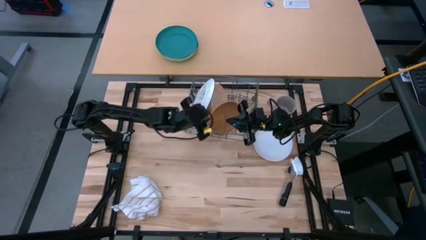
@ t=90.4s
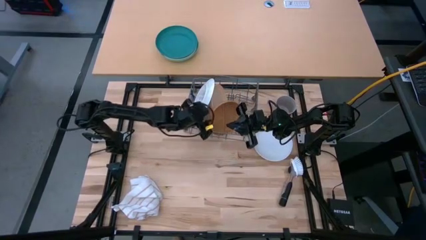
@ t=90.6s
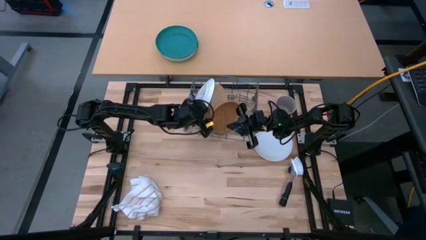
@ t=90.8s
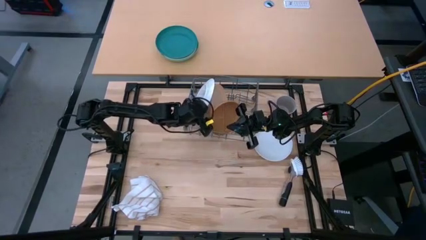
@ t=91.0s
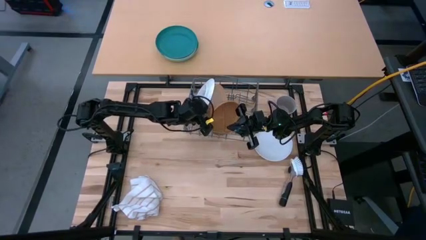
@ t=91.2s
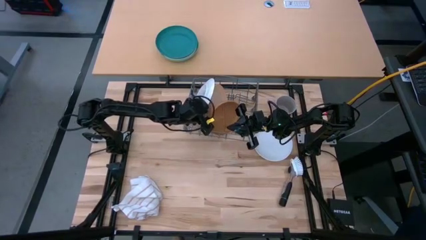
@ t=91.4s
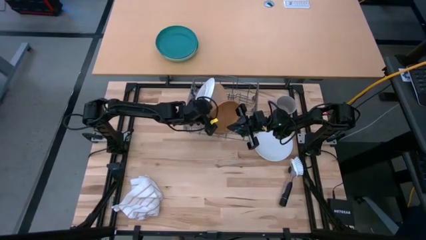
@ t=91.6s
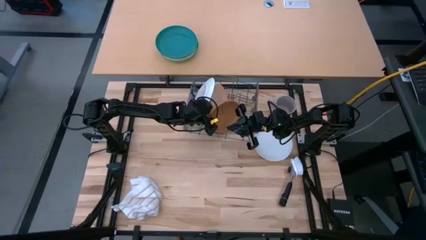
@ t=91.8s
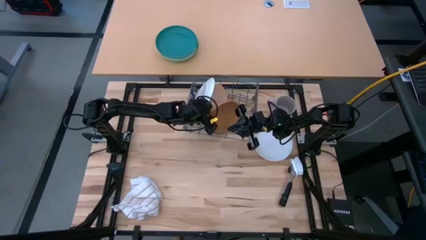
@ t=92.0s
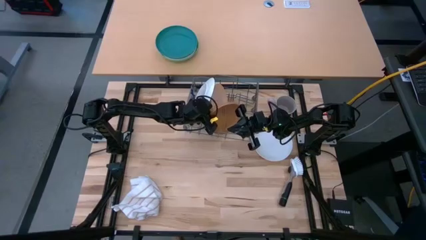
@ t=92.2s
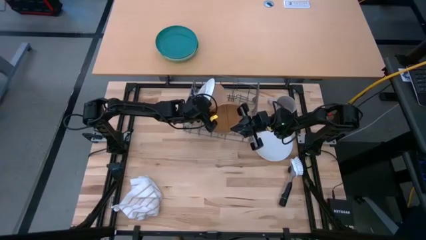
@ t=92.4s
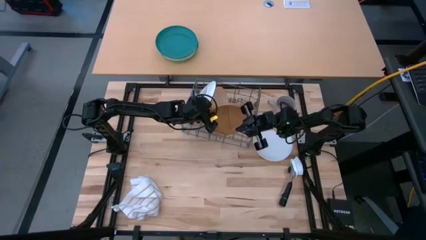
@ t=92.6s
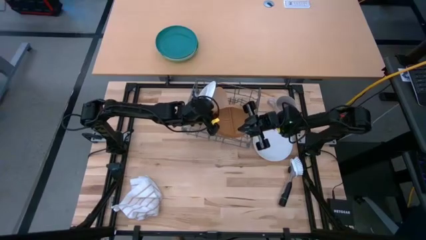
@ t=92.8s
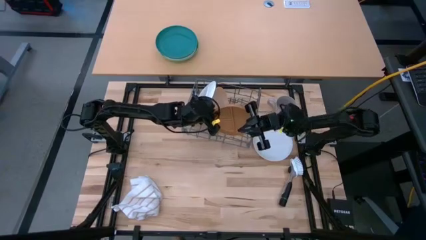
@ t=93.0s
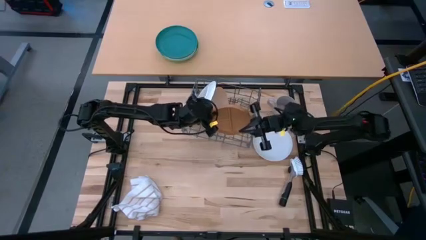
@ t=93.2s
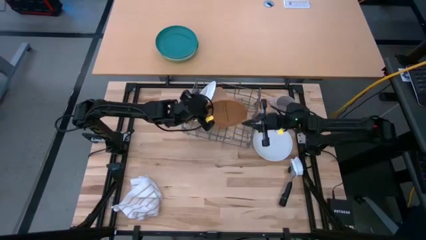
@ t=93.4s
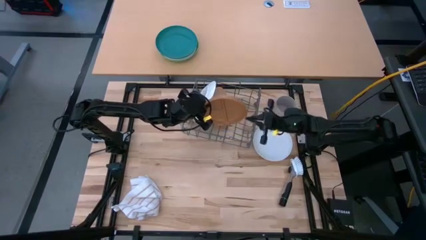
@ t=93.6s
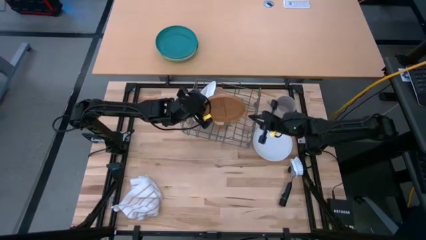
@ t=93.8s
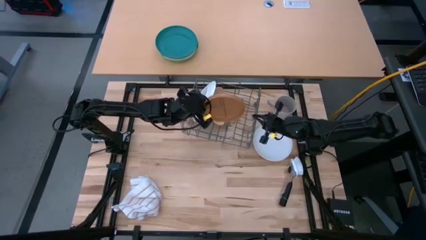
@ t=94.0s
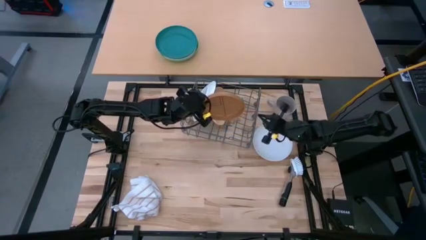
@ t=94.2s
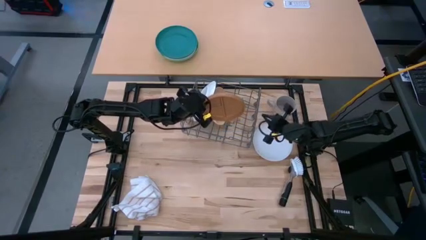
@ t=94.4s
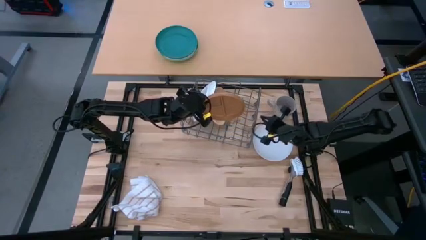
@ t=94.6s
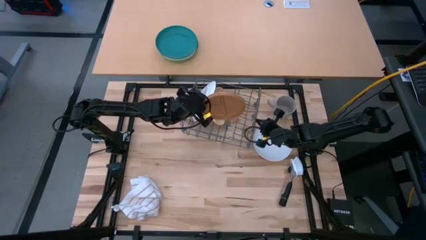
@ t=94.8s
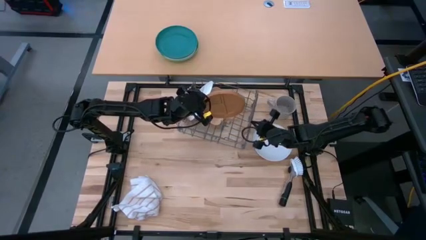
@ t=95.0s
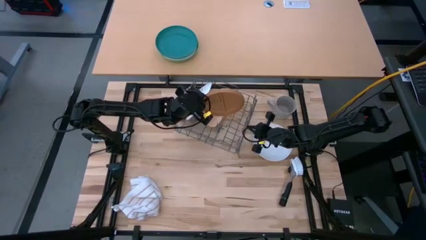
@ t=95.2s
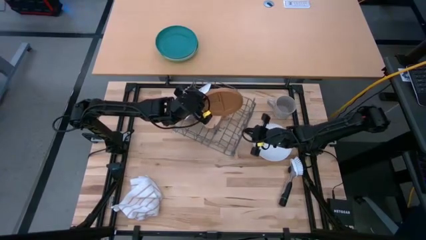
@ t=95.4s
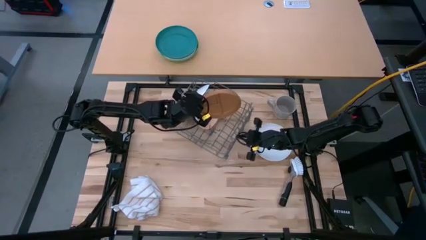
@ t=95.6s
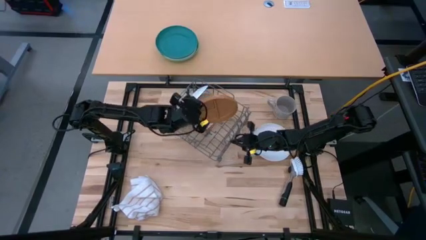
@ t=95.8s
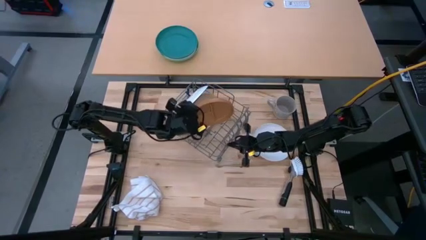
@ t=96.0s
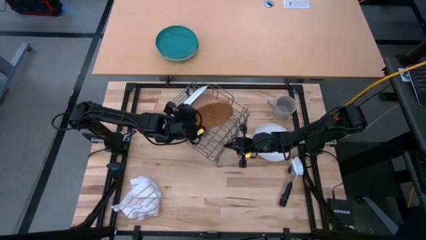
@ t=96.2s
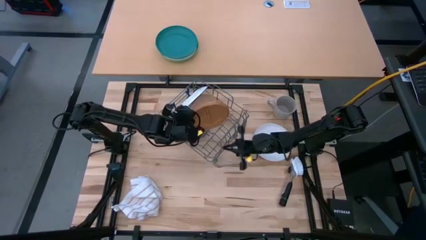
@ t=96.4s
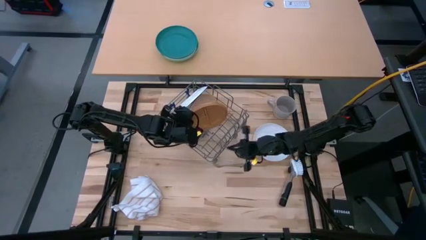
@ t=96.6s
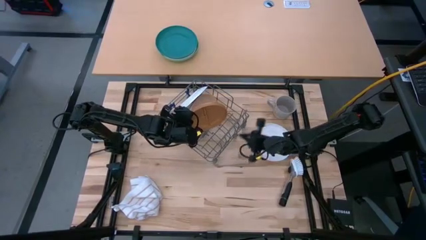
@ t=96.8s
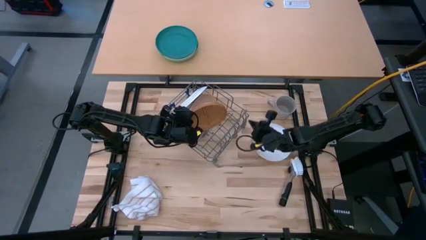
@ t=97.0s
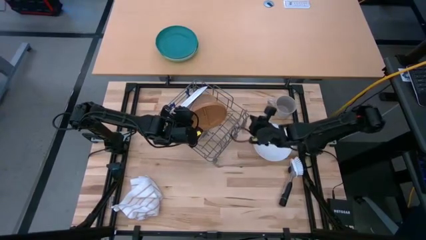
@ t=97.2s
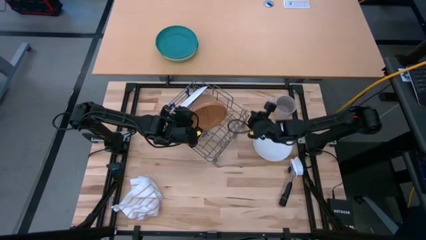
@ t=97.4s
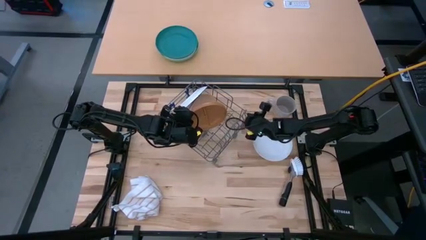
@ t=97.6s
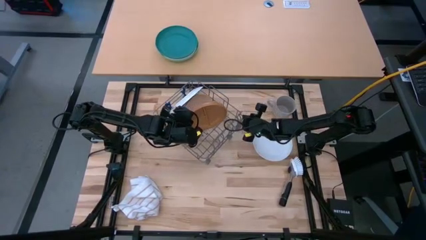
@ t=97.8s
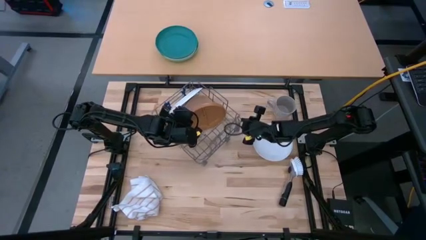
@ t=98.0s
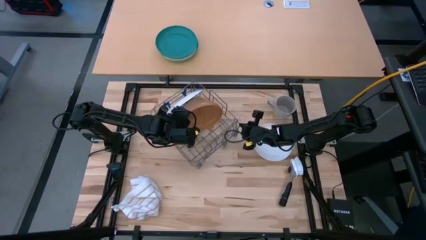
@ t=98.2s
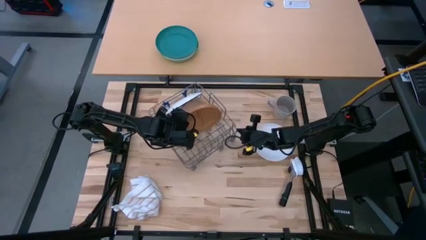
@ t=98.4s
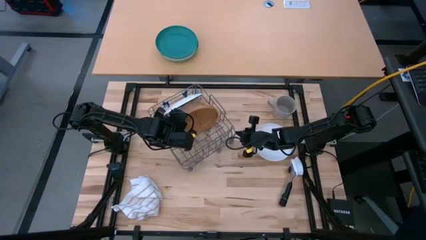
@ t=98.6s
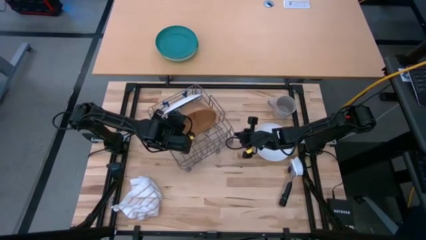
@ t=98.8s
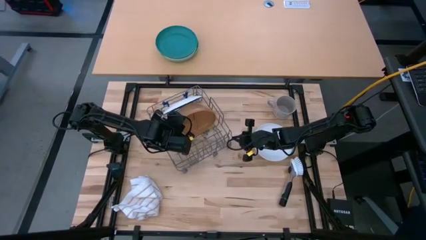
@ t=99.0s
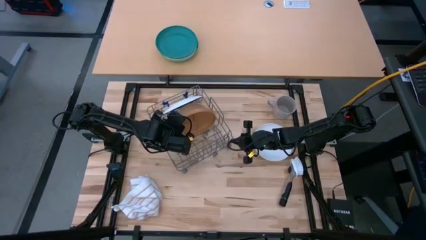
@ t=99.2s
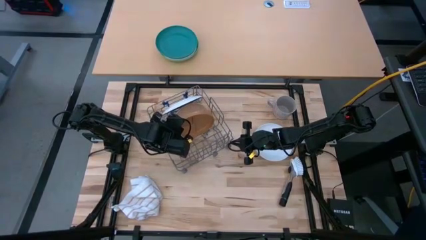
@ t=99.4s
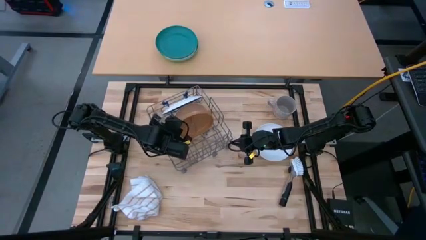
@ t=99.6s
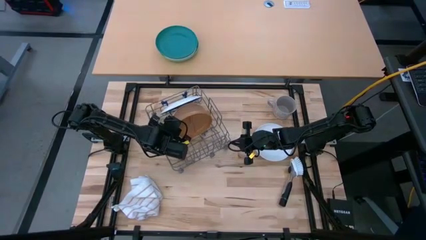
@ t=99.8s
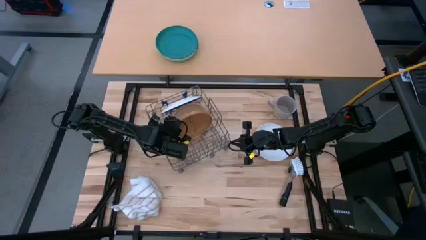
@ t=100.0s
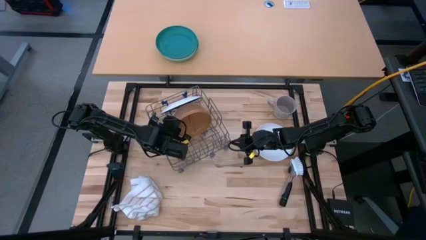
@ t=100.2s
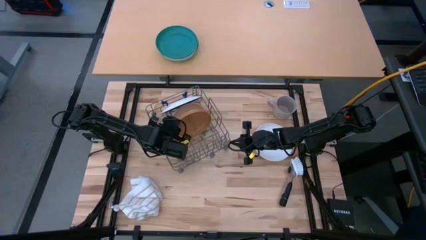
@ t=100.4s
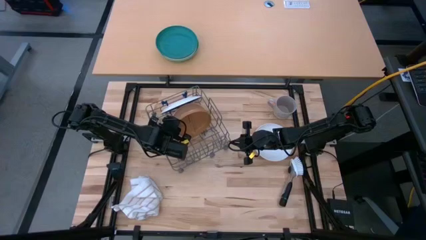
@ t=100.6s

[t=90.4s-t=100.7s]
Task: Sort dishes
Put the brown plate in the dish rack

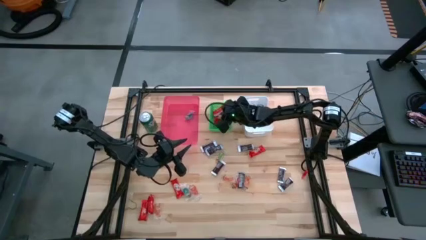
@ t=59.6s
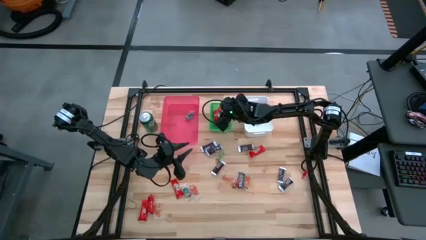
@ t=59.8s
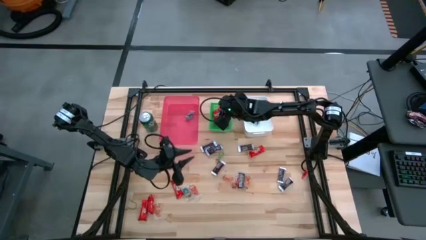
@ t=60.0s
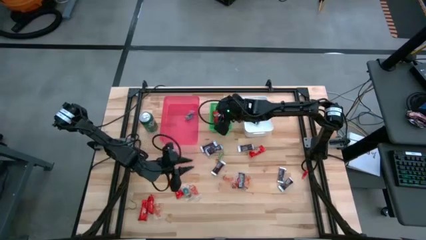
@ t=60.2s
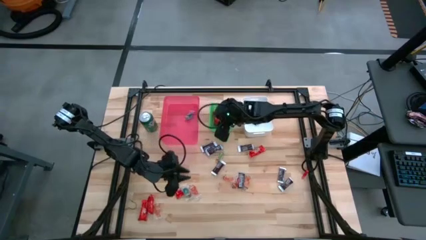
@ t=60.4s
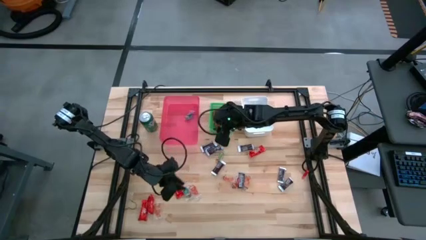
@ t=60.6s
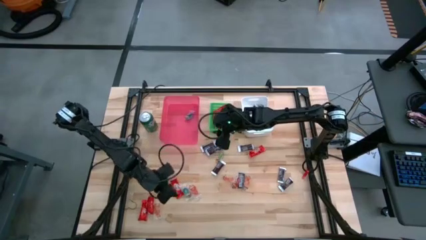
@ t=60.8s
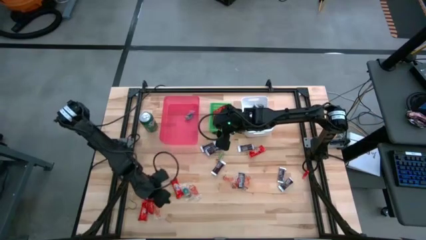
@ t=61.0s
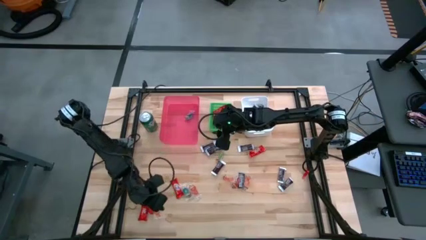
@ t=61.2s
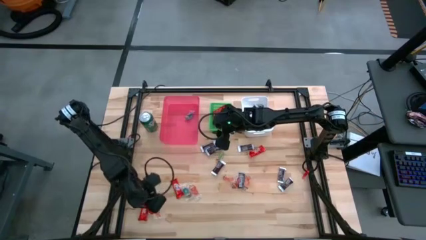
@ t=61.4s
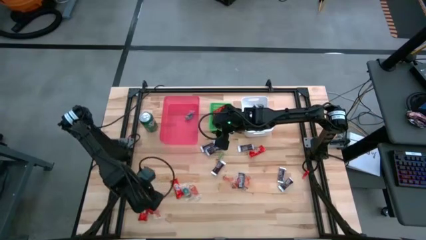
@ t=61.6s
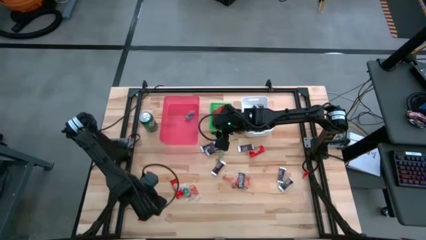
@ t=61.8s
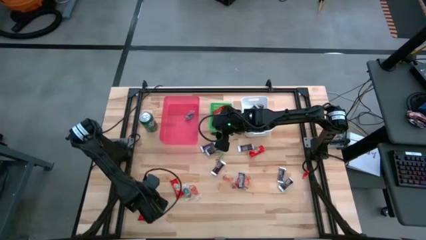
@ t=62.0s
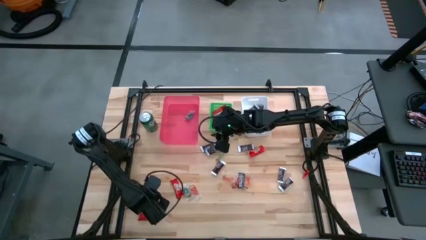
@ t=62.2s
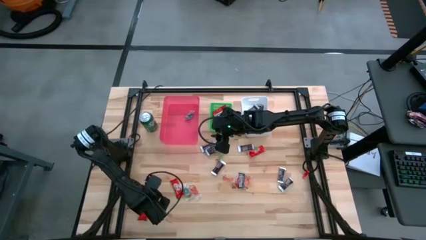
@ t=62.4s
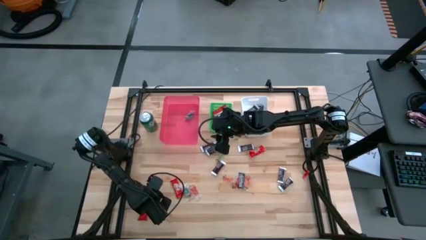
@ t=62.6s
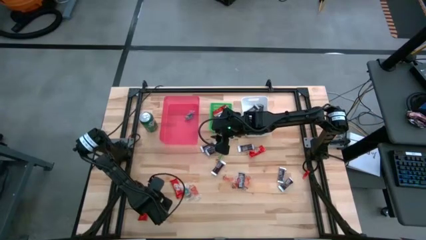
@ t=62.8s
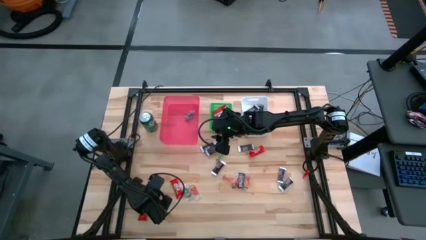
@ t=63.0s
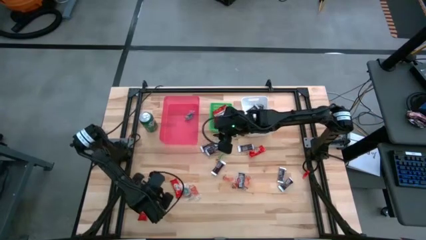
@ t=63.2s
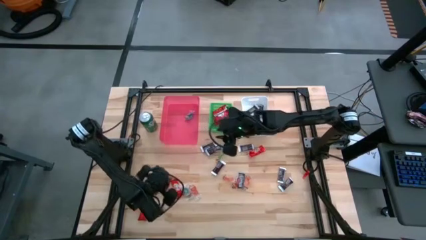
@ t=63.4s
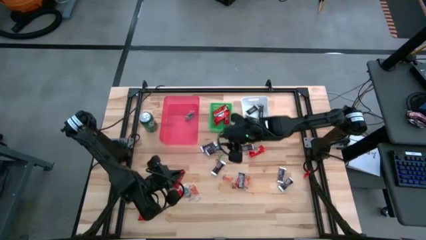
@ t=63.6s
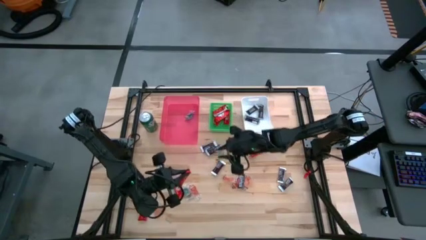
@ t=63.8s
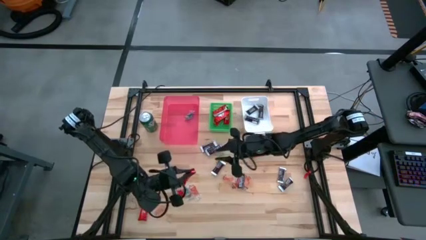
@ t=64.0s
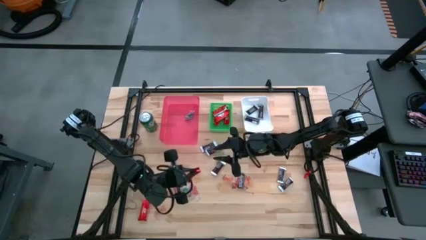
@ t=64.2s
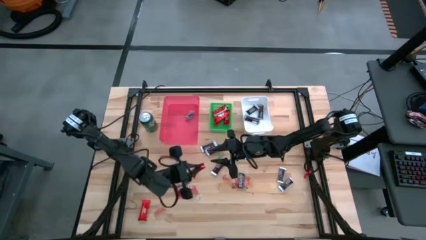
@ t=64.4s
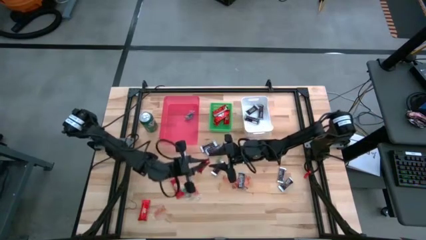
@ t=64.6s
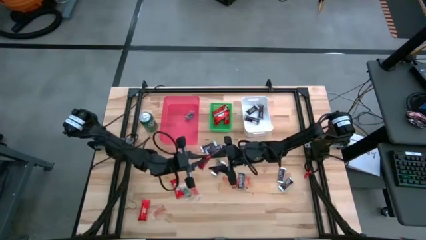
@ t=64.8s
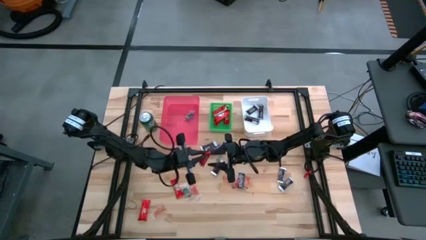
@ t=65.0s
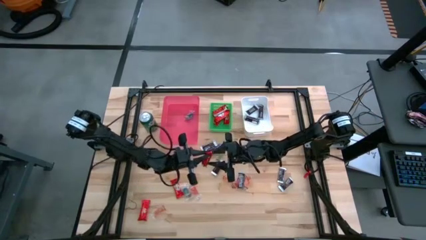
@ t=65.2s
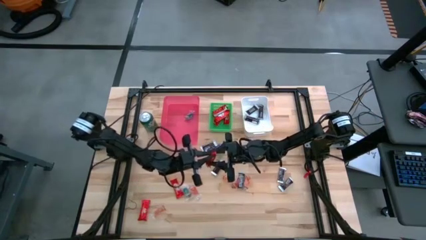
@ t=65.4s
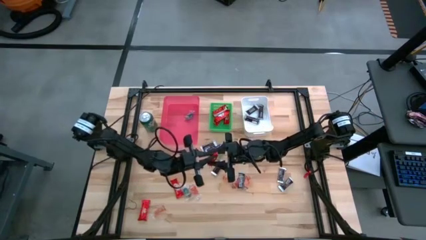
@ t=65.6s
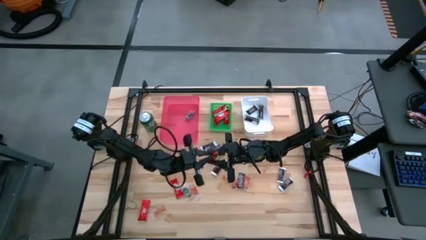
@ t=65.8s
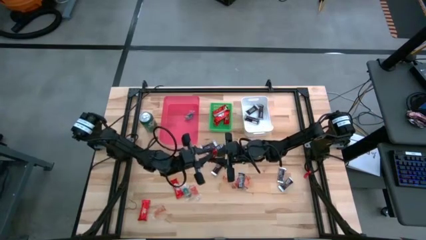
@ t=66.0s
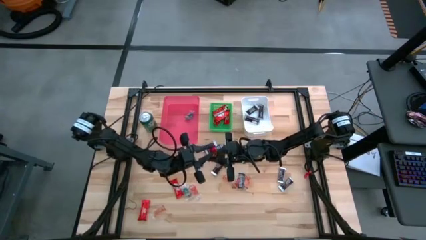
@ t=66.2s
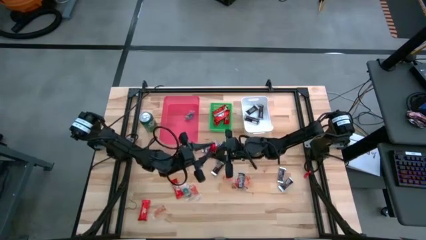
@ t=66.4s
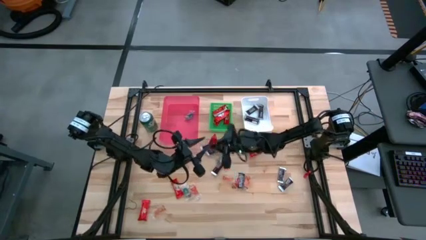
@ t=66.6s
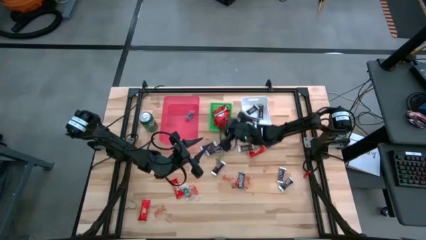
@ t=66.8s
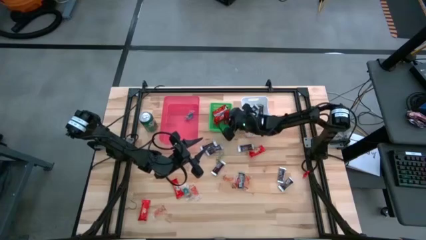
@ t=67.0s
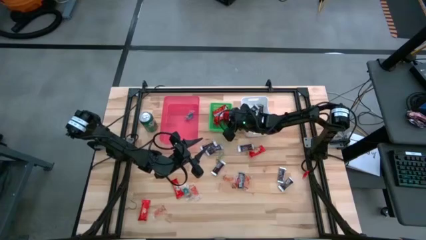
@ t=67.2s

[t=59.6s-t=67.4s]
Task: Sort candy
Put the red chocolate into the green bin
